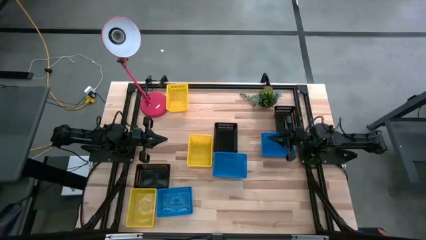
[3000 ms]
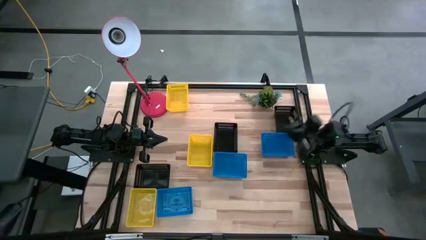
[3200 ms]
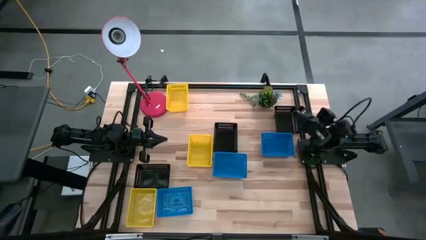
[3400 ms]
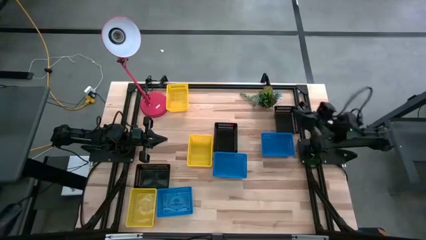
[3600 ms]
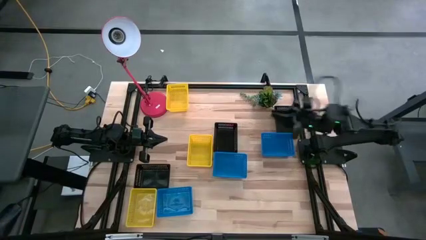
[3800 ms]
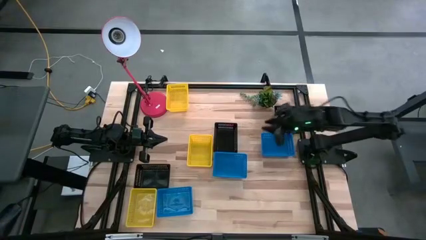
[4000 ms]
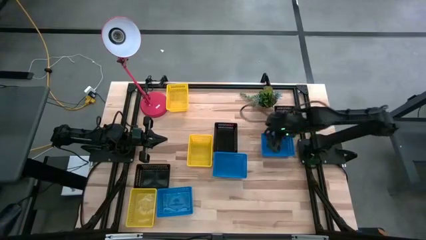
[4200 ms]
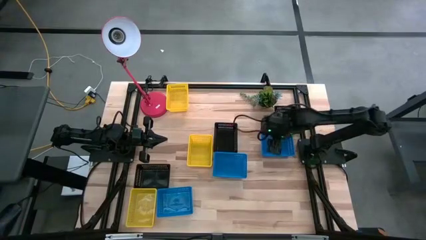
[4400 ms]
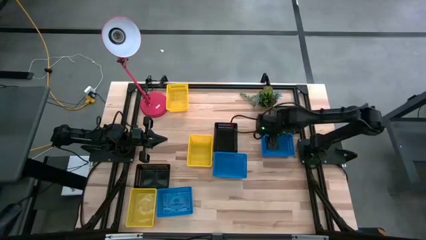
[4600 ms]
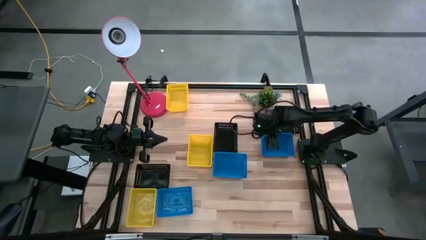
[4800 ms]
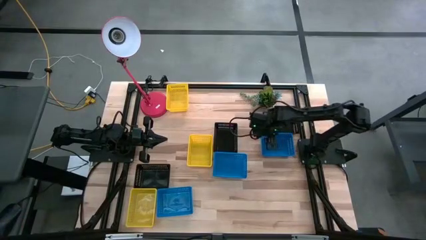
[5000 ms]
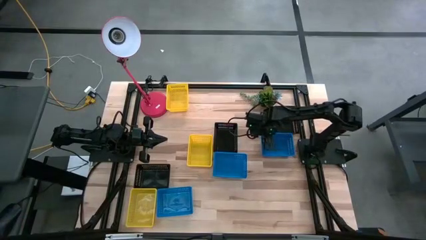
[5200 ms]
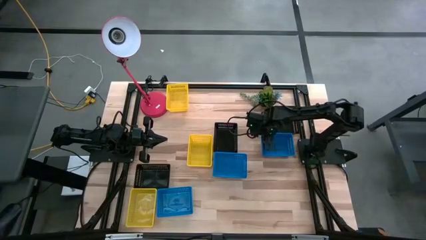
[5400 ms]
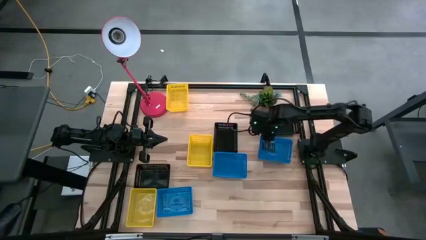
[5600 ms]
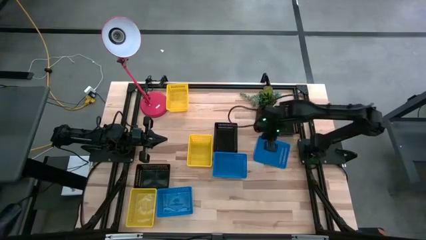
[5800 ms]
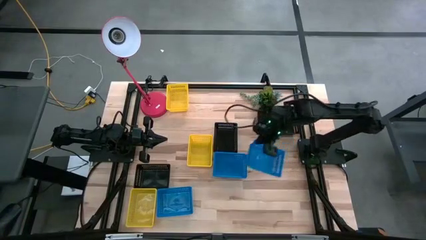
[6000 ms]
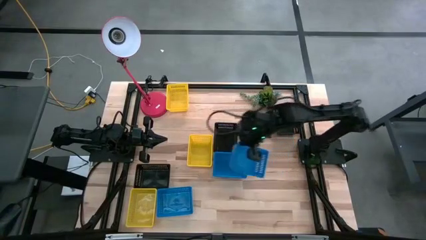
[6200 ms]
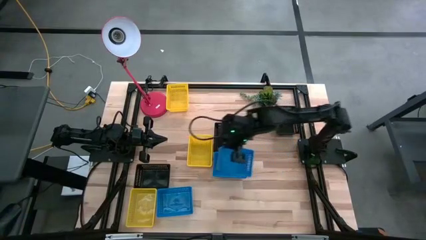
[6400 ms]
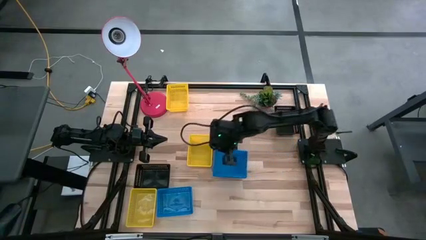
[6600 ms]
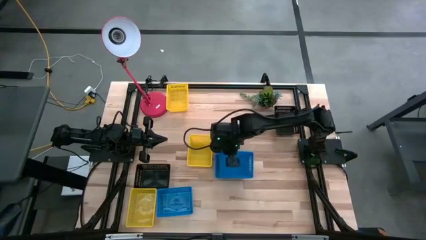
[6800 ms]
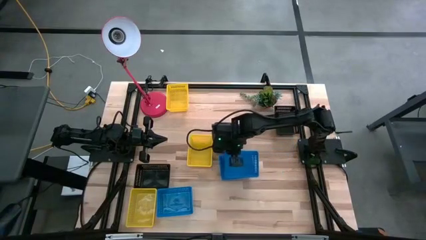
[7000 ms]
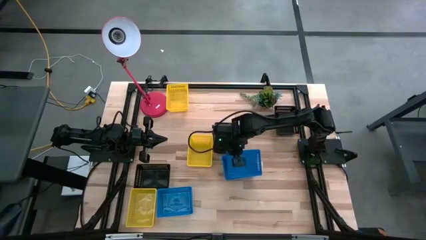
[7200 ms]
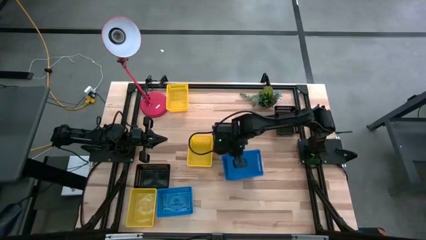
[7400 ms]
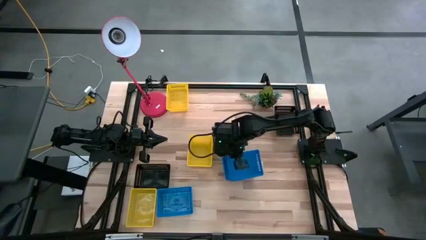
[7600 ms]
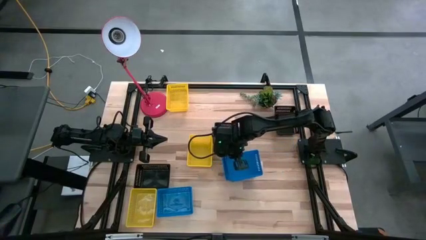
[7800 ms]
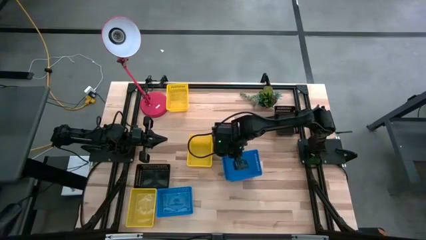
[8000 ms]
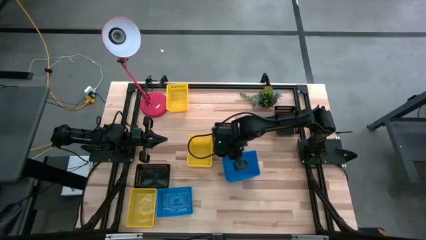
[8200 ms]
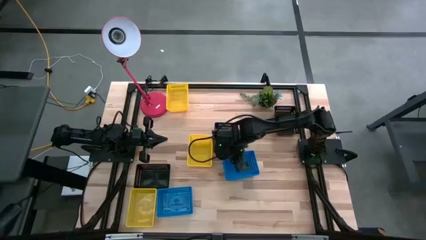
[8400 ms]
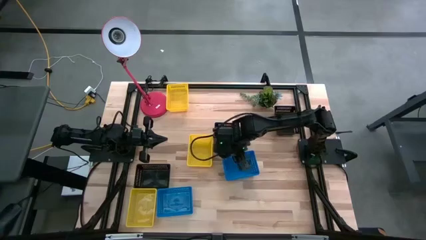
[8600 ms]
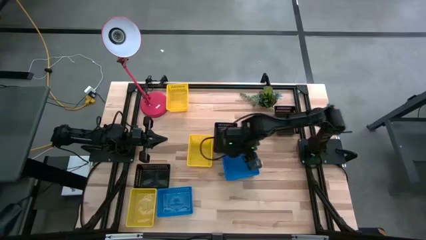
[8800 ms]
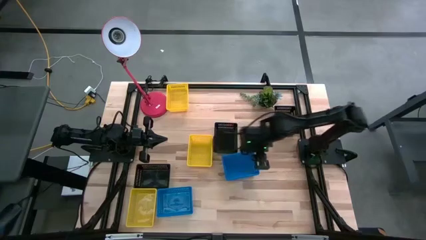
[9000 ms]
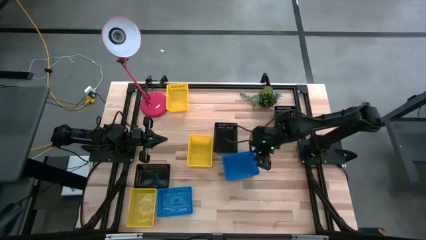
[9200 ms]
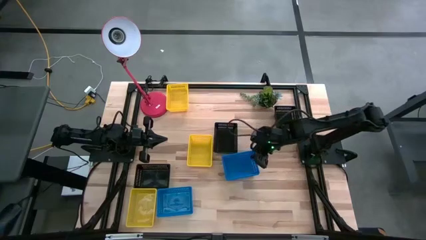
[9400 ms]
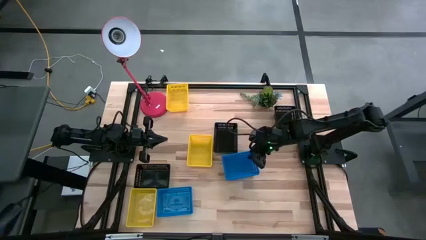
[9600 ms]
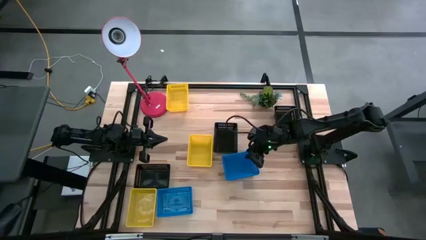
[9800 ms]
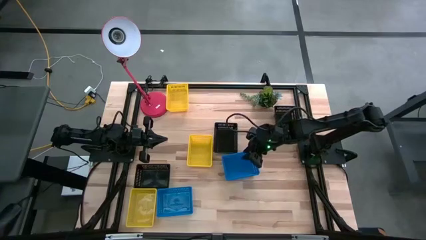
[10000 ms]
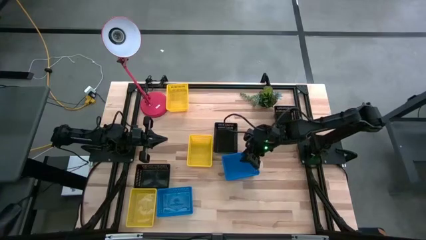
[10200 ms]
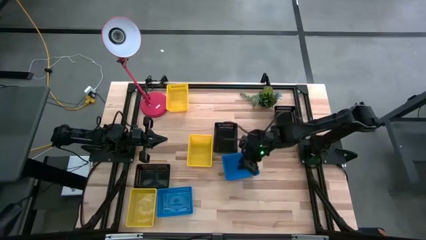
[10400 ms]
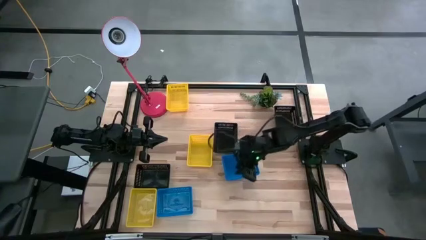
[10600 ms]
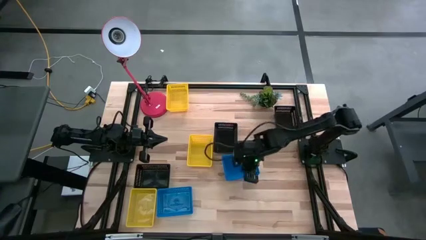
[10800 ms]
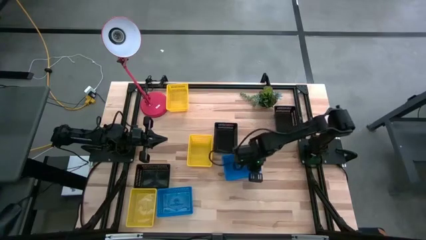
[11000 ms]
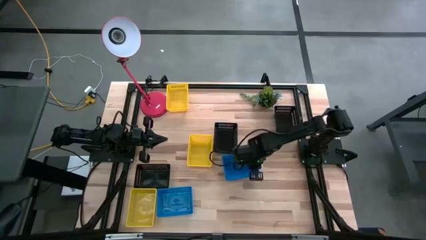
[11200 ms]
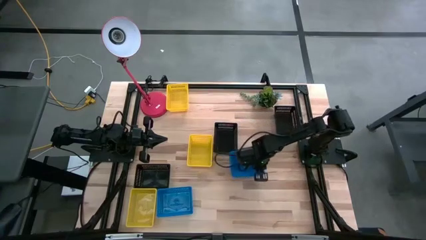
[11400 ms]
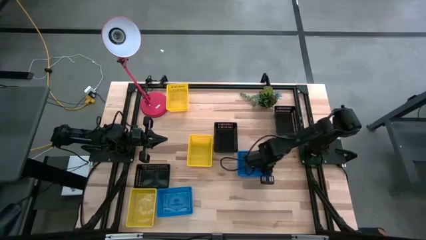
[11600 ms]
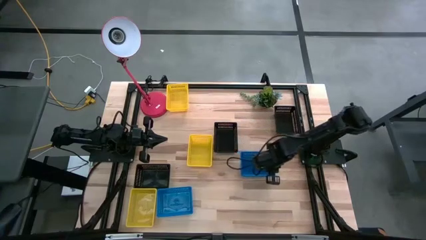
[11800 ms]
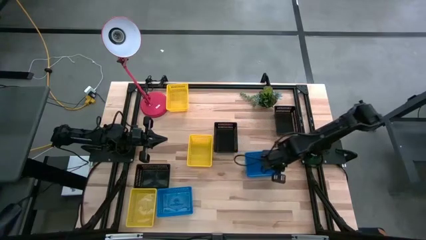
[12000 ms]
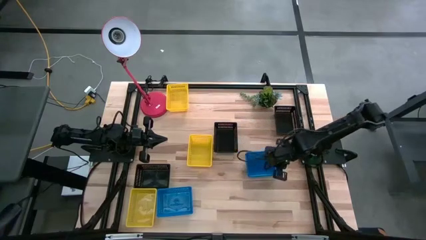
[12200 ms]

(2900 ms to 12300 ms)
Stack the right blue bin on the middle blue bin

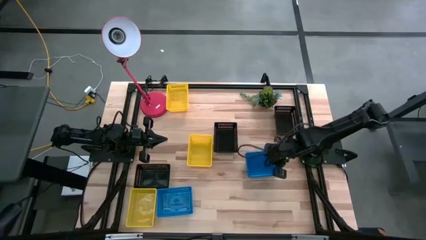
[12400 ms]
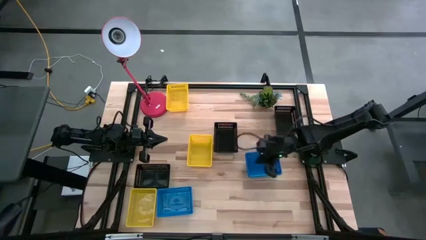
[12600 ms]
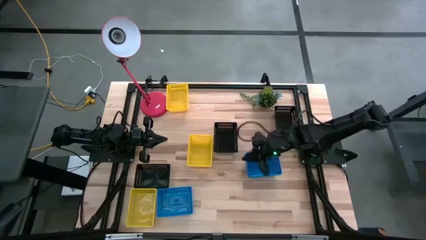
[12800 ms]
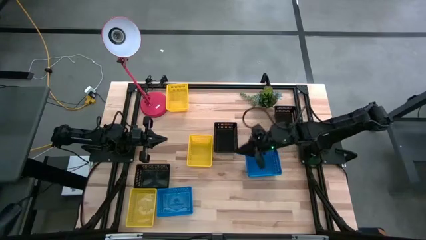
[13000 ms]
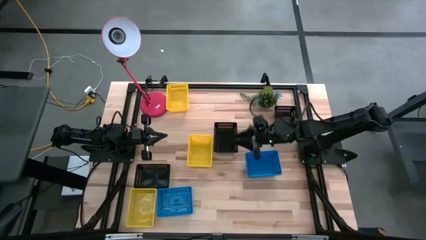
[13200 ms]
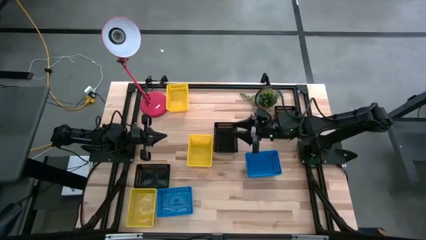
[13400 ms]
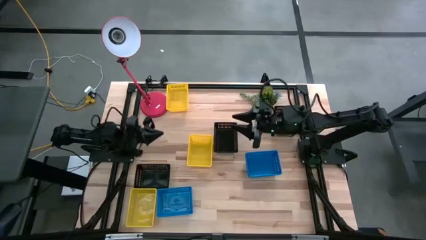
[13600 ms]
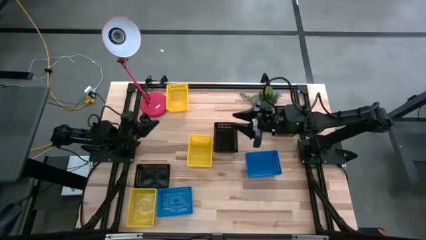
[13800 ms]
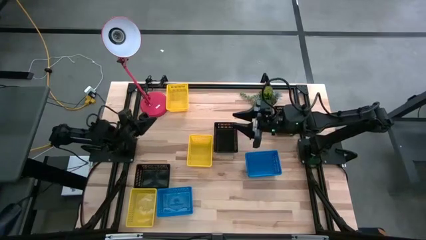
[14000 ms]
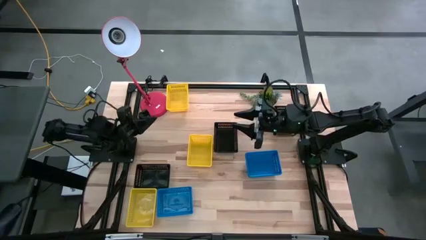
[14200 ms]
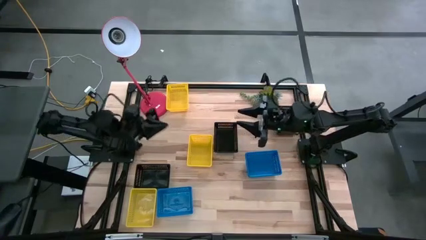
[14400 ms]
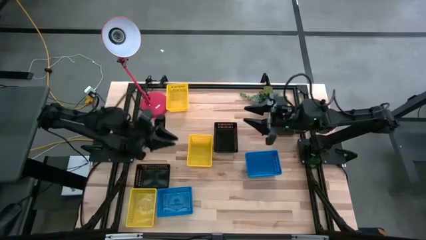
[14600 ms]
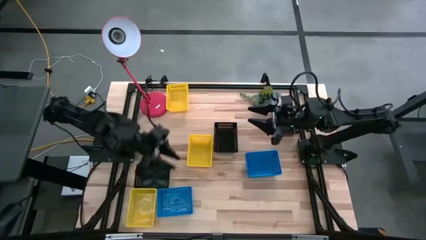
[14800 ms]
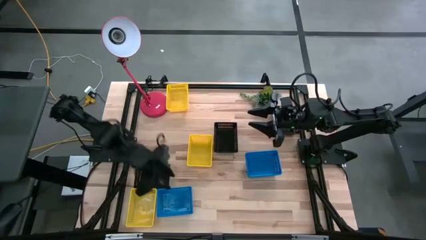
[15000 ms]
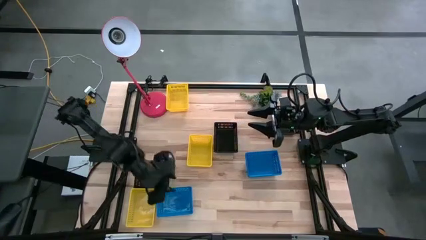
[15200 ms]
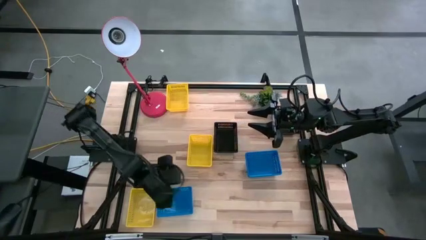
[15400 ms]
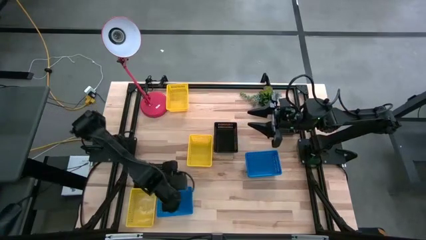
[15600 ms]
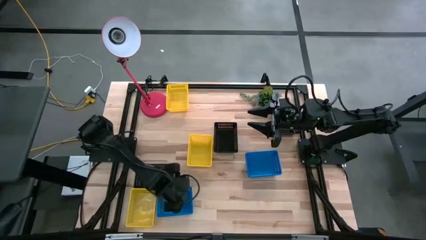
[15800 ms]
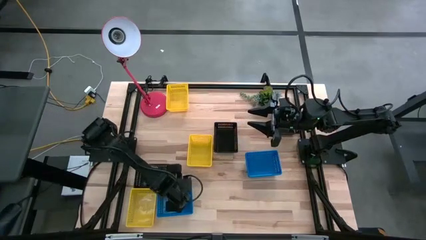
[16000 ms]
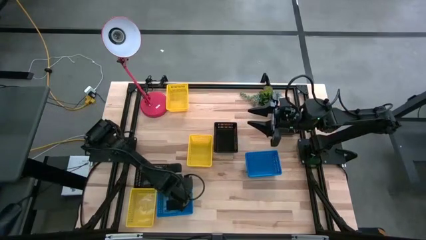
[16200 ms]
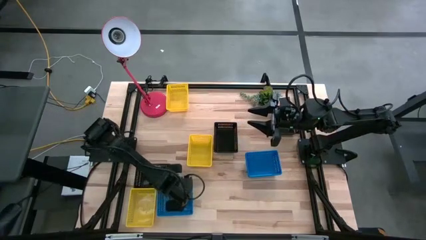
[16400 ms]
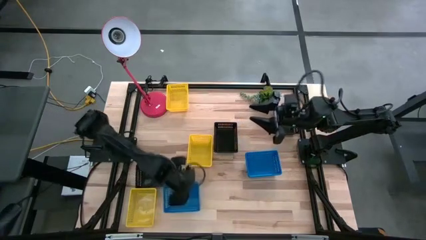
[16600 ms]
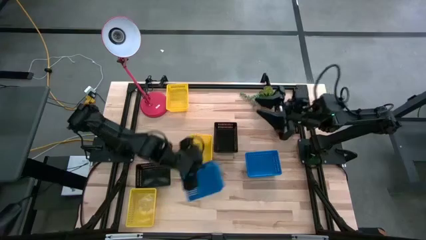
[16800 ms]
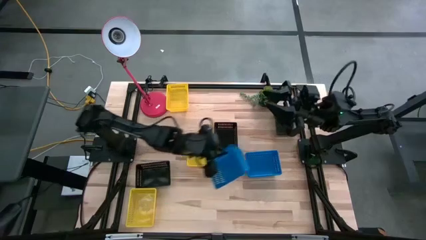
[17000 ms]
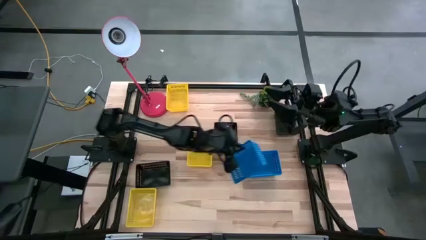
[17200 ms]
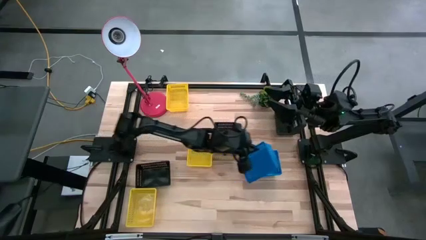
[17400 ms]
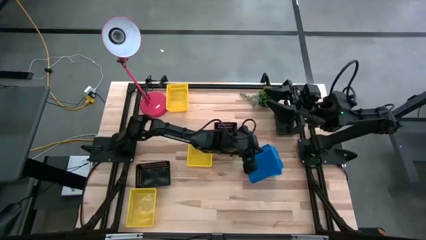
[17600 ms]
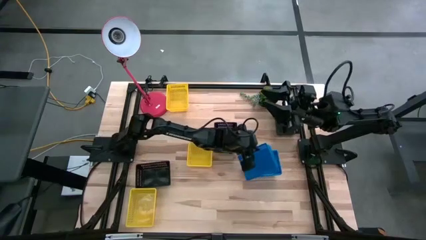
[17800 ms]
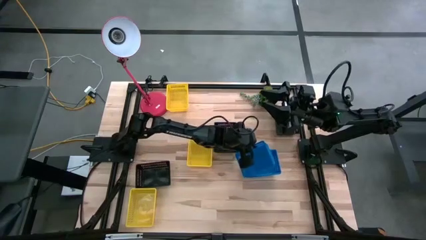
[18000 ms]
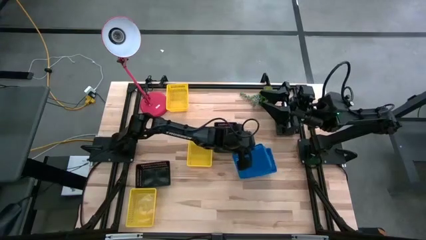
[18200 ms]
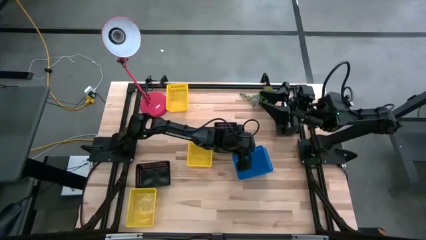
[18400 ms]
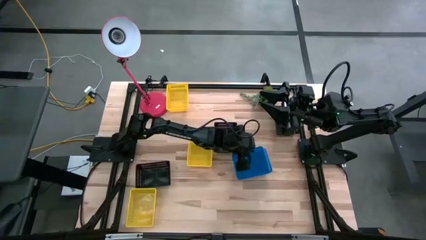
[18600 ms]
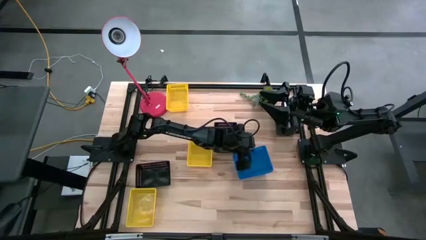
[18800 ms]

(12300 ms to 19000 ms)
Stack the bottom blue bin on the top blue bin
